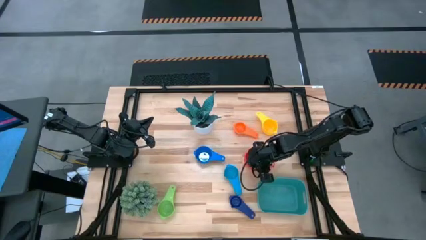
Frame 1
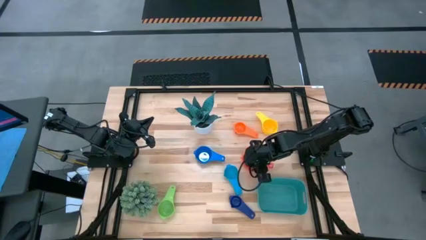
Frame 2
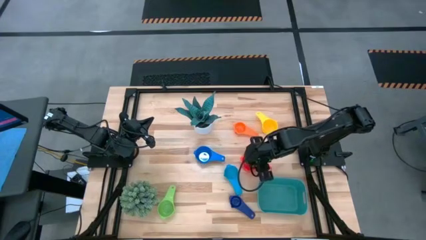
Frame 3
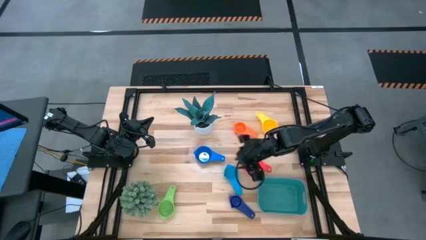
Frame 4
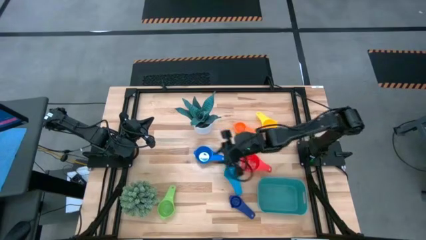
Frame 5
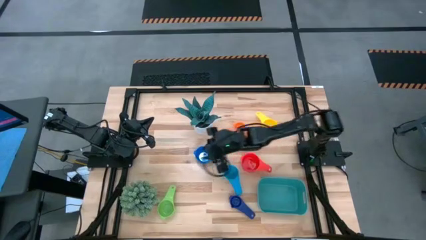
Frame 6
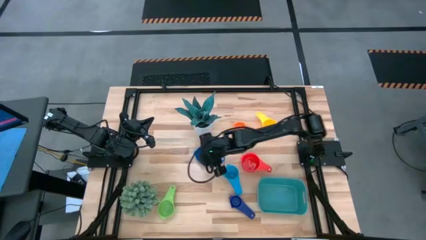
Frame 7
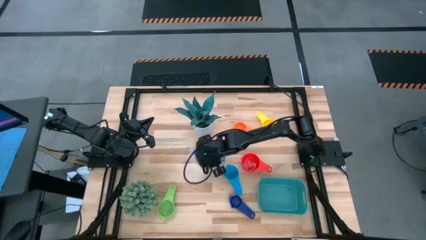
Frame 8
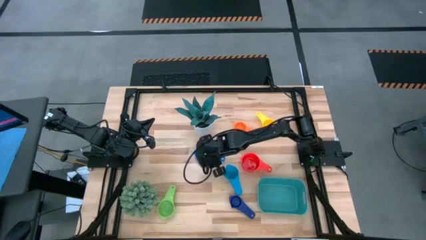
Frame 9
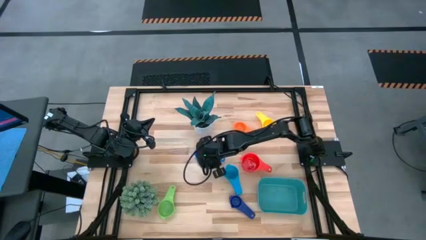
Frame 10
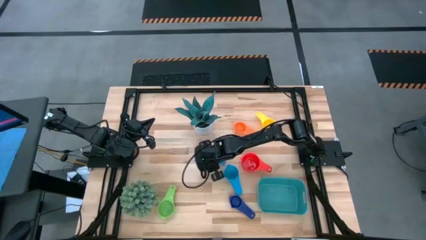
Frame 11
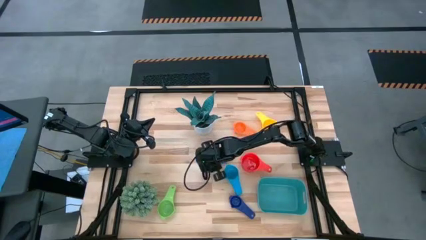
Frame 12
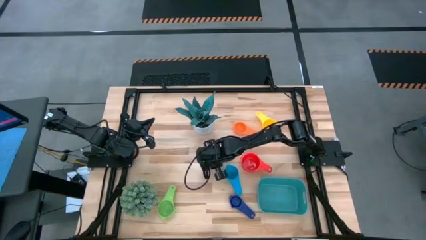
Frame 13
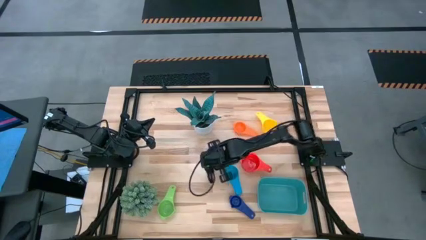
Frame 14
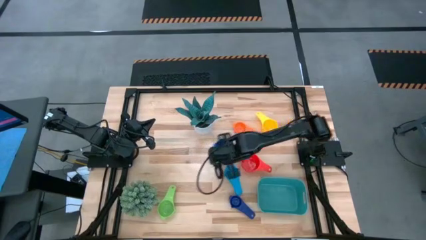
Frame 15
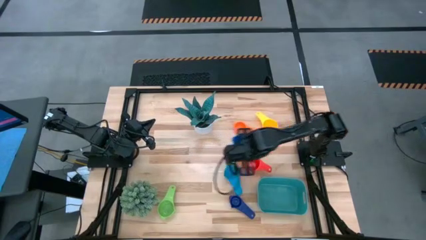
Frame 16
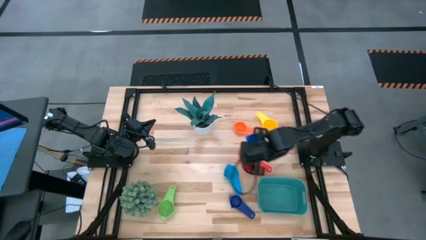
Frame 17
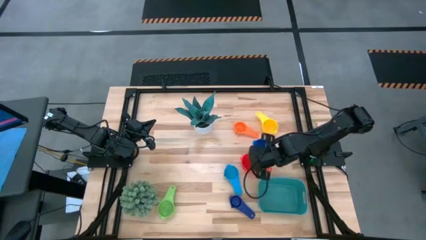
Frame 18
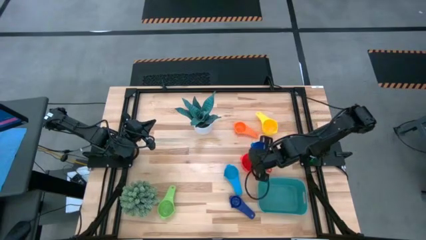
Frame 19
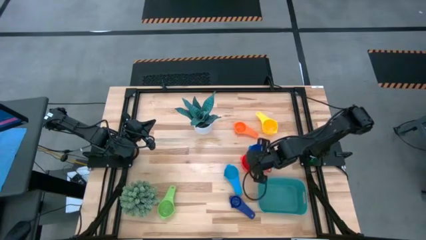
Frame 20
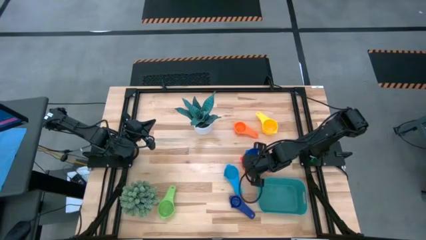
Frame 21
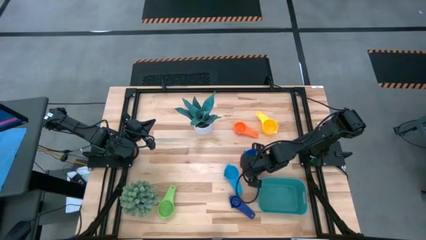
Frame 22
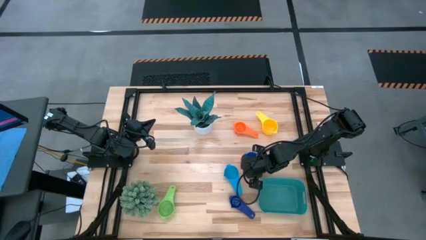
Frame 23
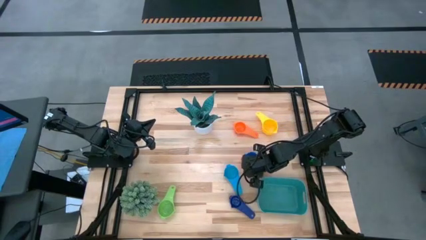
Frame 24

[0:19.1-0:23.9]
Task: Nest measuring cups in basket
Stack the blue measuring cup on top of the red measuring cup

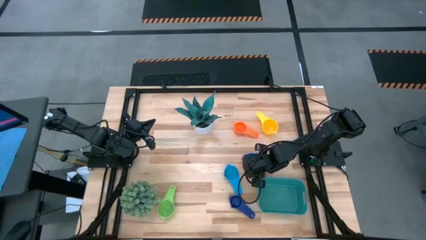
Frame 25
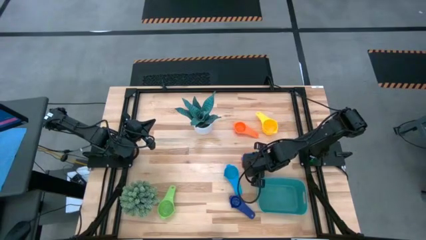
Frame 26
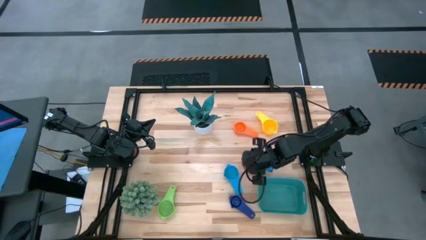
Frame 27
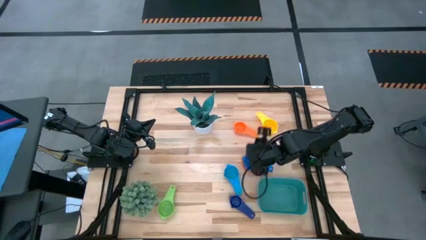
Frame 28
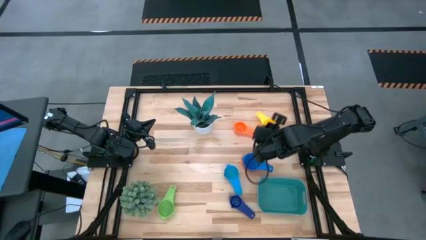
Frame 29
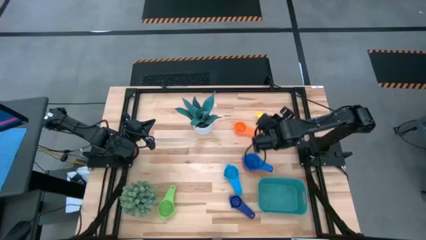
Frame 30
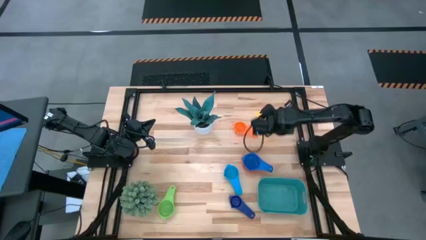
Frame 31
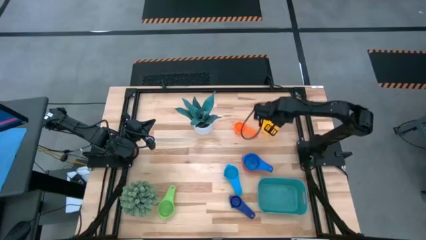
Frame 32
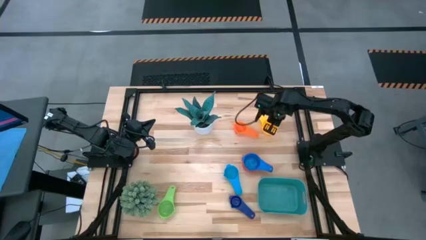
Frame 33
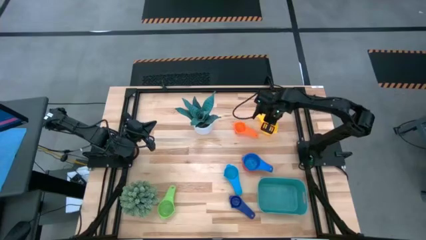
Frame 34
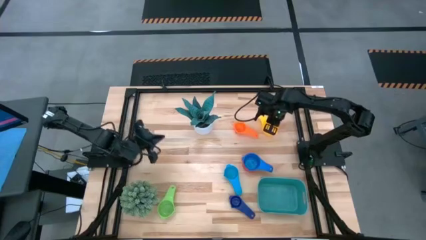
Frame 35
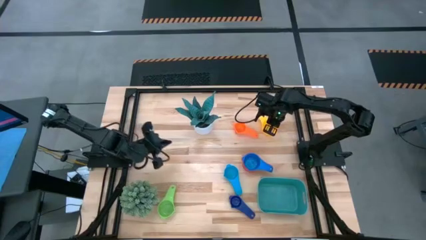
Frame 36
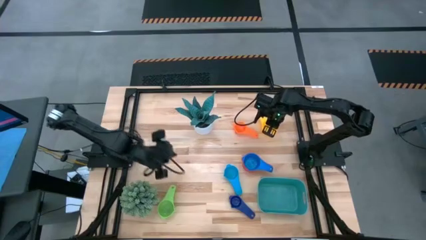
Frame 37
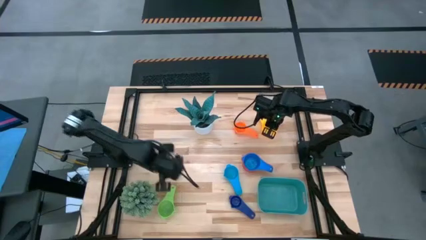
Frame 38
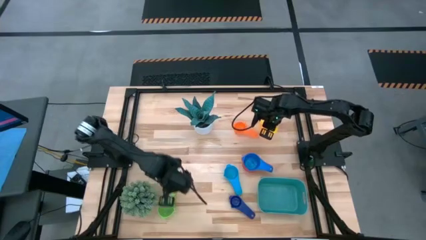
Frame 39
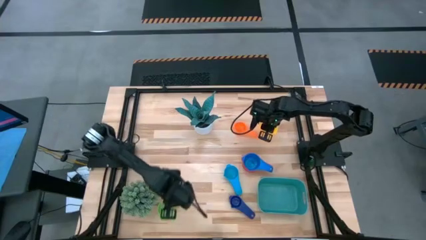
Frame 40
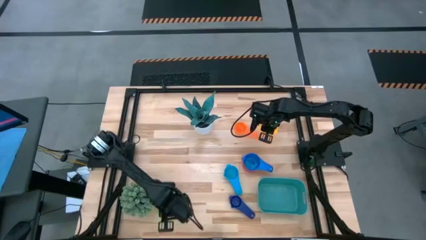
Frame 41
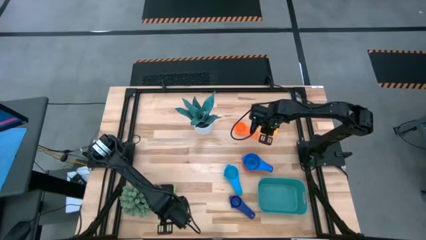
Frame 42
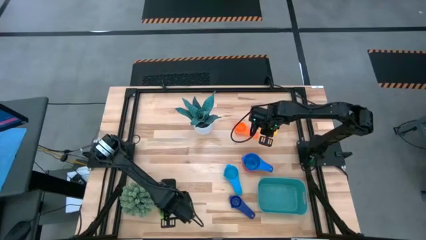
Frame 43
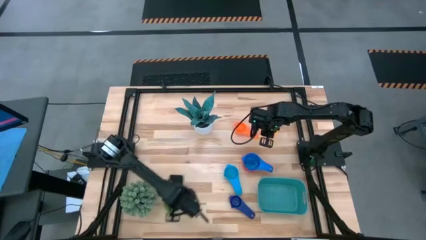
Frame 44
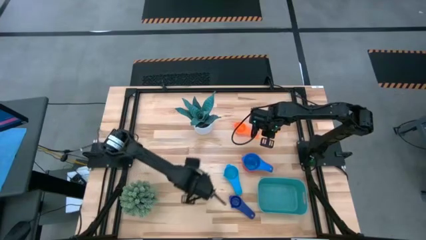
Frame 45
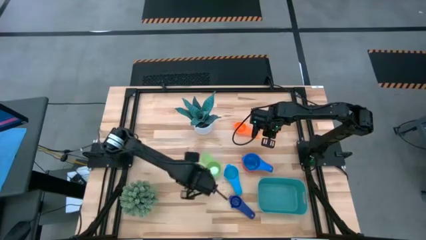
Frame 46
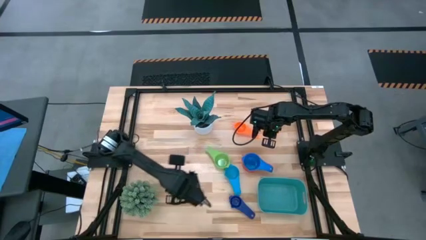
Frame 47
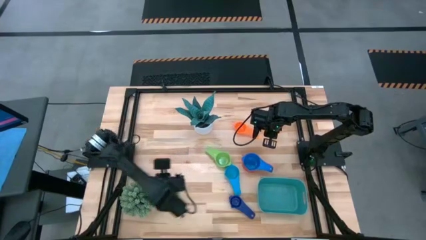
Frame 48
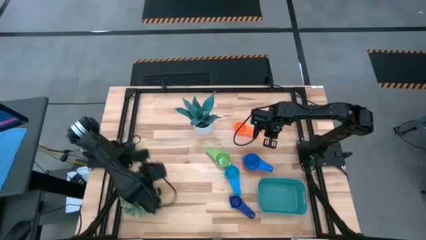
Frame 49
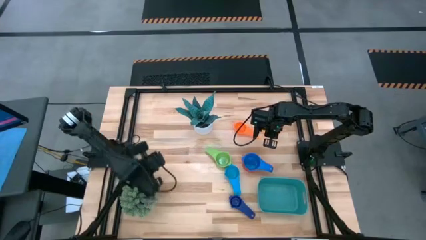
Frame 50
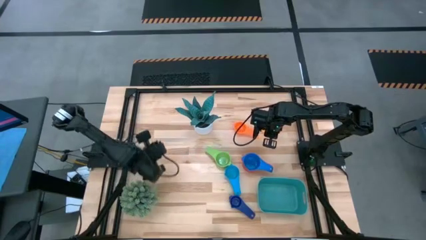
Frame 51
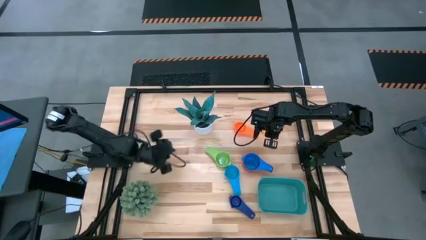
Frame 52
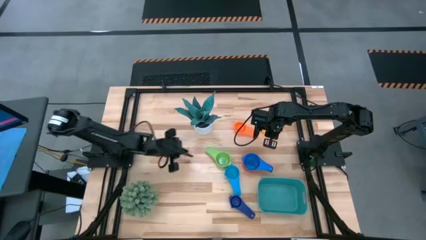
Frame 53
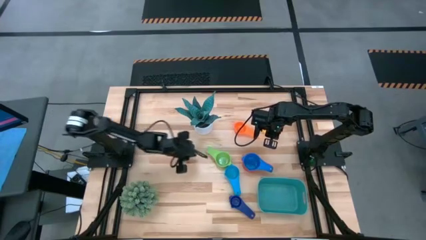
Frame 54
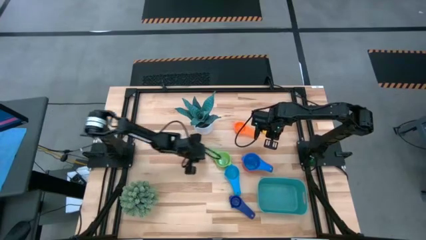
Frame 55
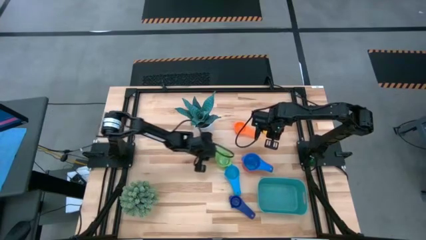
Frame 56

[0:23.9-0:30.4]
Move the green measuring cup to the center of the table

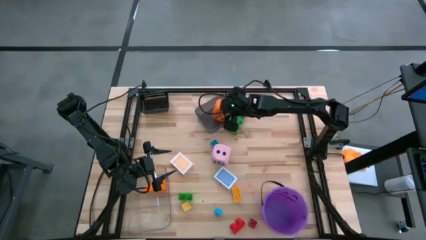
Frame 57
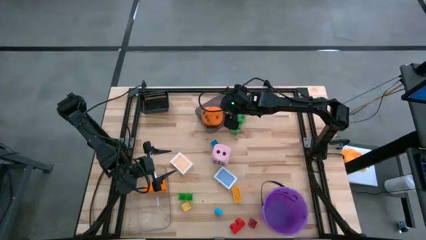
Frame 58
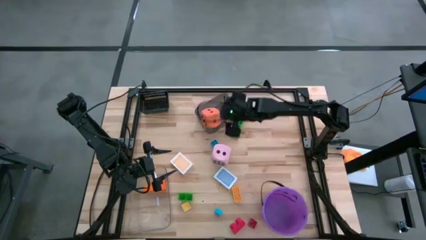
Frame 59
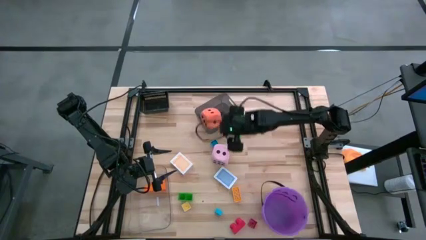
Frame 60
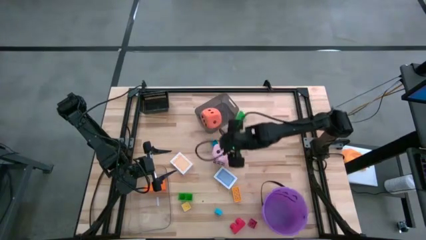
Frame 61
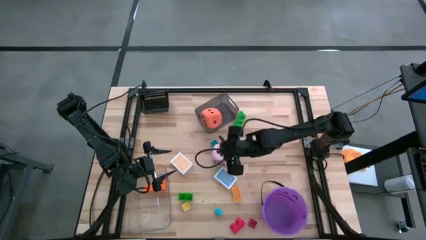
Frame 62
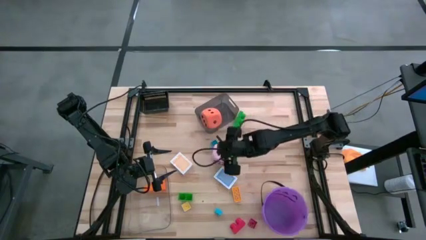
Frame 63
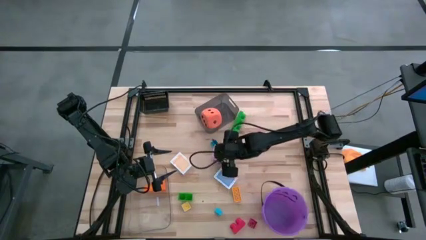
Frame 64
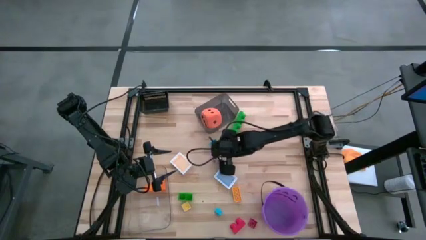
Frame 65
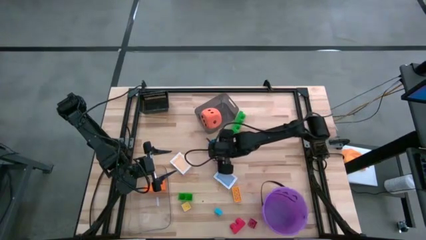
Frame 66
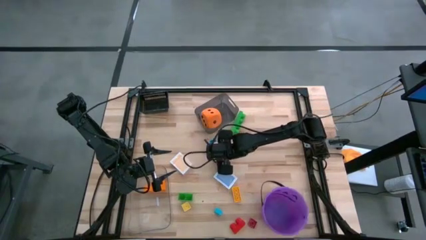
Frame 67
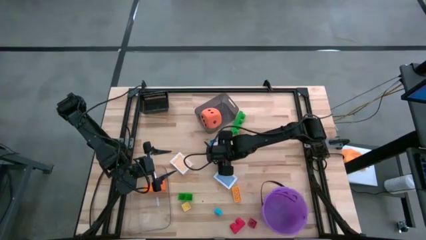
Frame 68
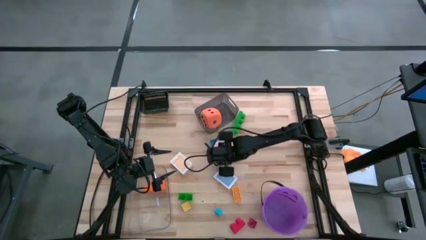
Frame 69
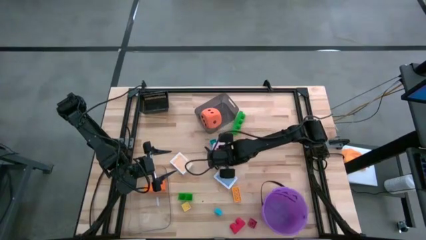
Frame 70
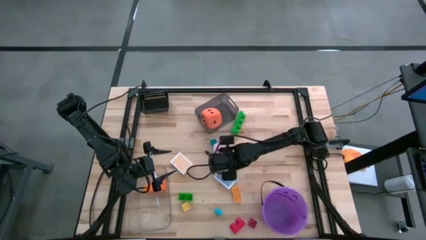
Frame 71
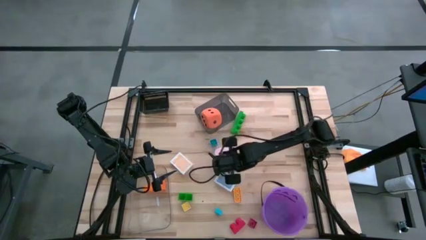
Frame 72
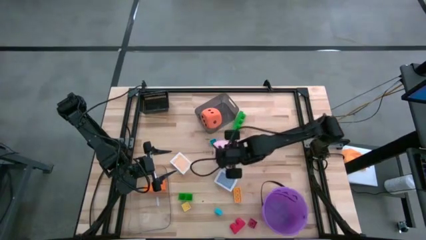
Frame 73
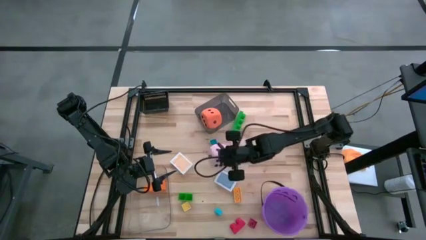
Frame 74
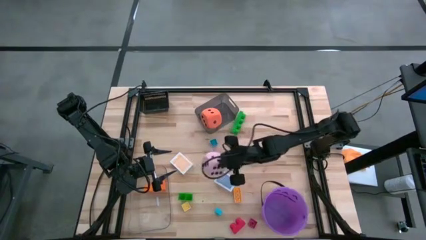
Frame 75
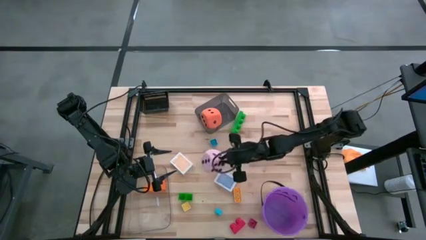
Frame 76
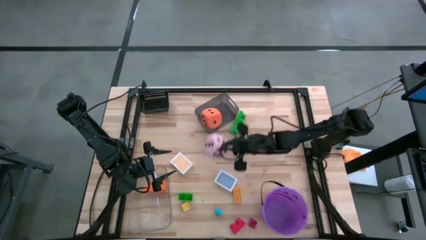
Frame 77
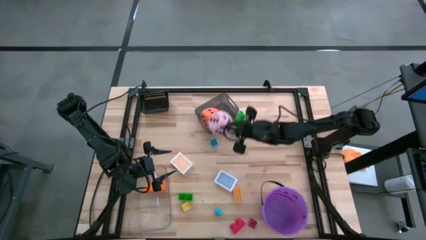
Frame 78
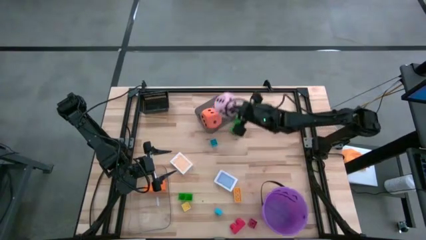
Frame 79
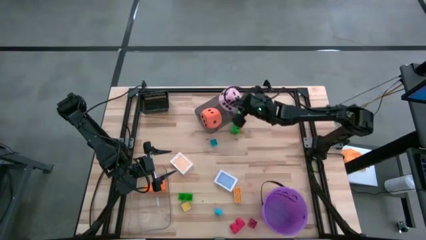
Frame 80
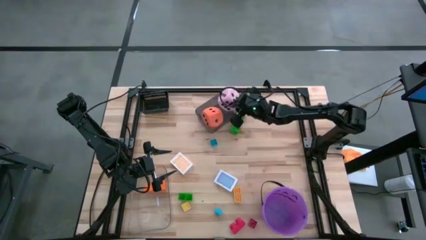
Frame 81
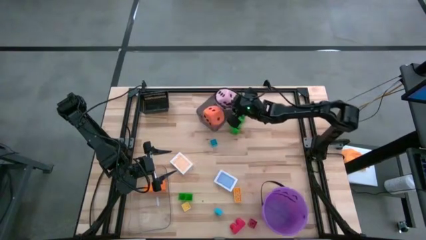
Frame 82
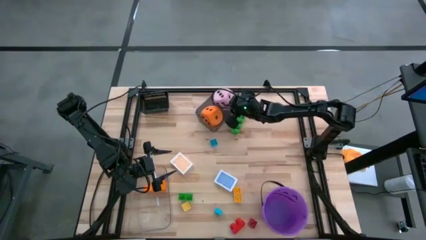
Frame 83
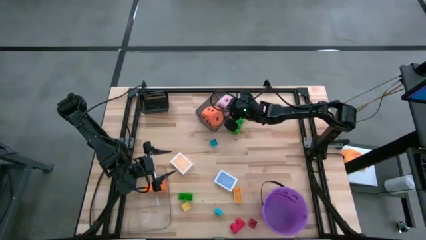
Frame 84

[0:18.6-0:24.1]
Task: Pick & Place Toys
Put the pink dice into the gray bin
